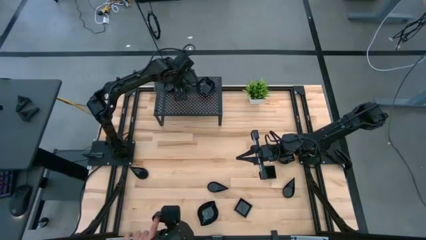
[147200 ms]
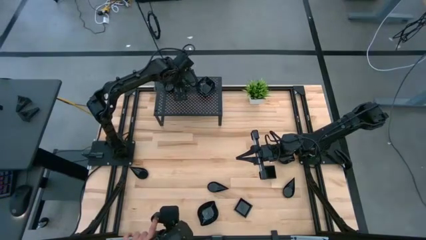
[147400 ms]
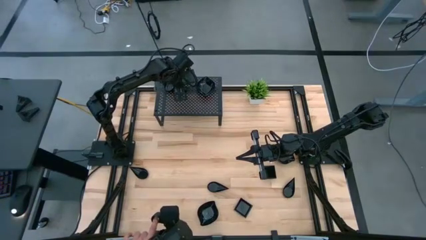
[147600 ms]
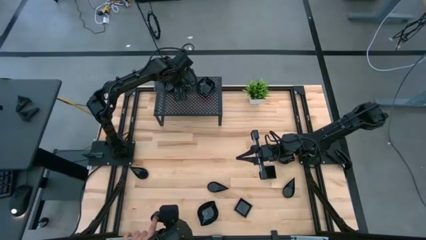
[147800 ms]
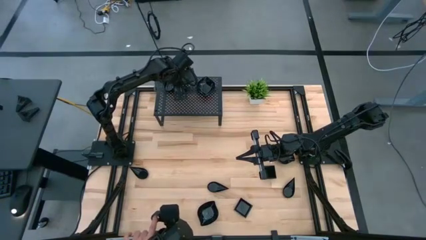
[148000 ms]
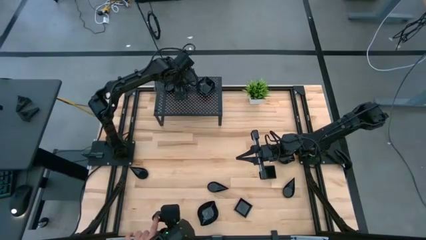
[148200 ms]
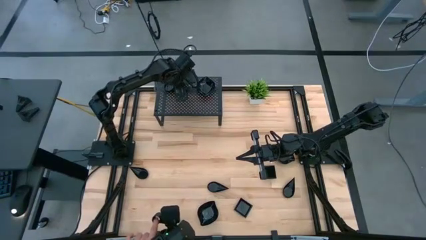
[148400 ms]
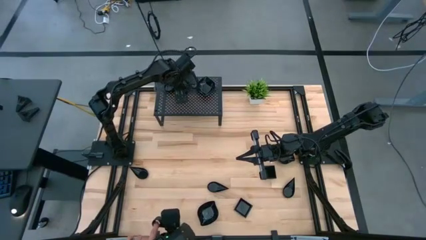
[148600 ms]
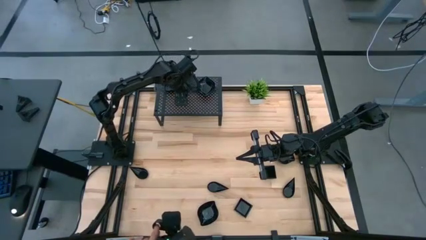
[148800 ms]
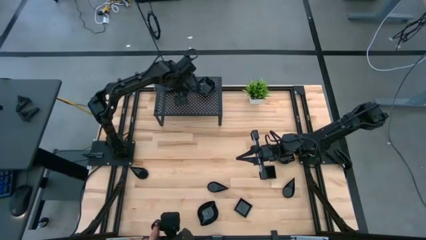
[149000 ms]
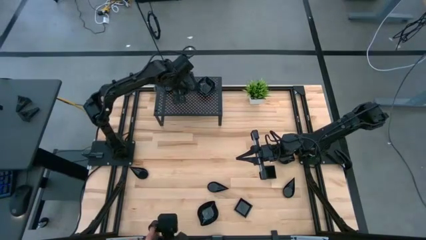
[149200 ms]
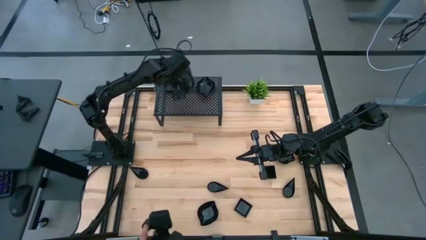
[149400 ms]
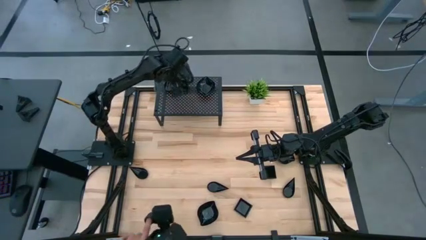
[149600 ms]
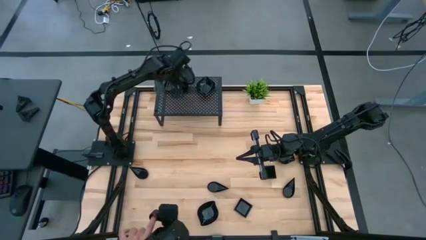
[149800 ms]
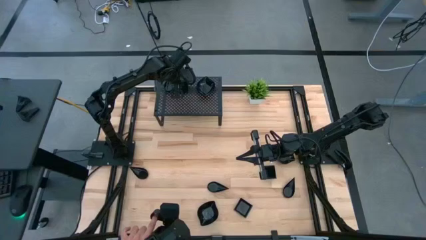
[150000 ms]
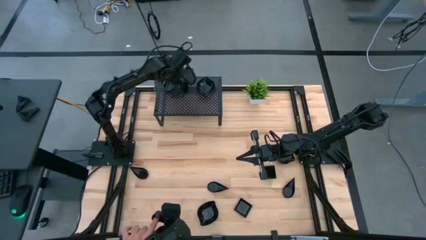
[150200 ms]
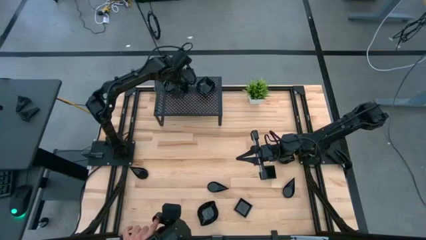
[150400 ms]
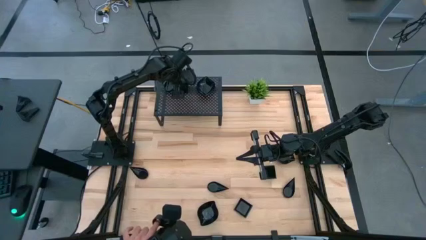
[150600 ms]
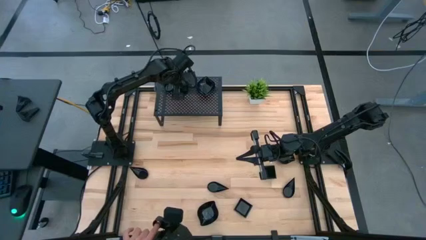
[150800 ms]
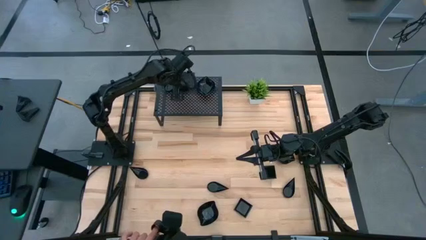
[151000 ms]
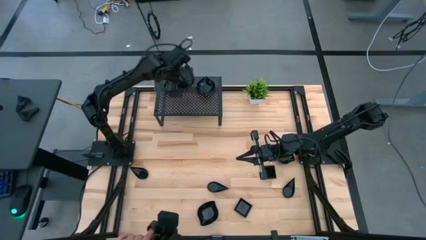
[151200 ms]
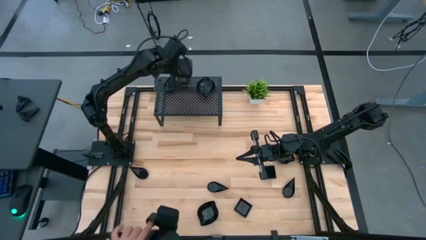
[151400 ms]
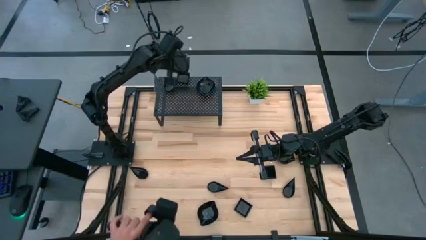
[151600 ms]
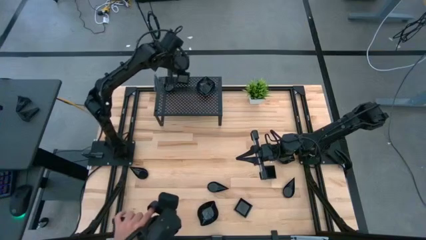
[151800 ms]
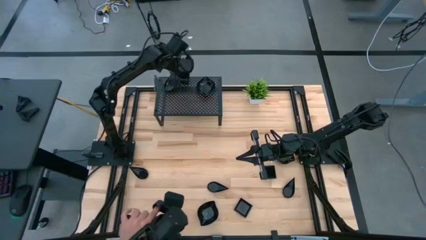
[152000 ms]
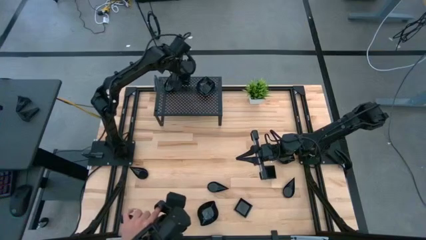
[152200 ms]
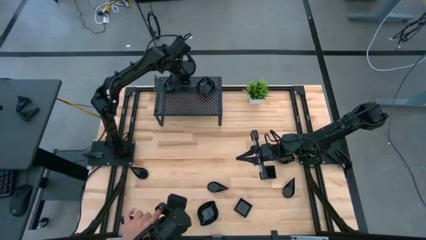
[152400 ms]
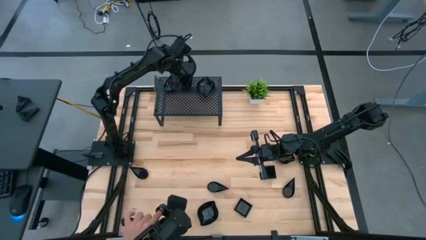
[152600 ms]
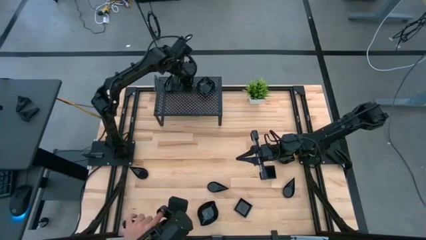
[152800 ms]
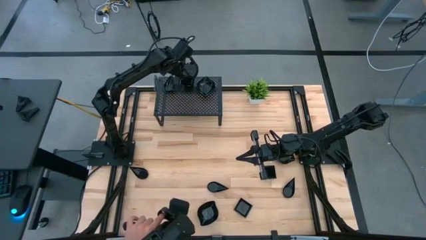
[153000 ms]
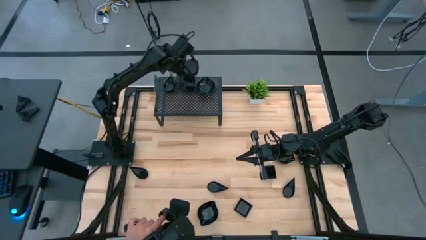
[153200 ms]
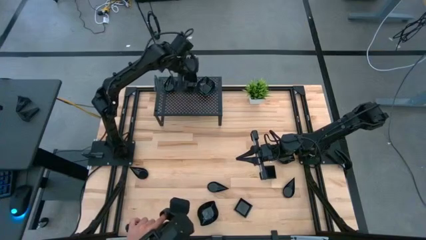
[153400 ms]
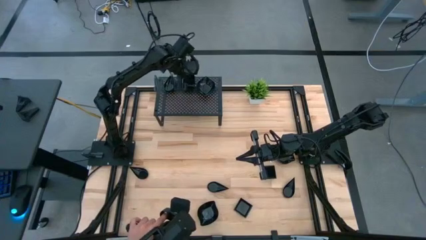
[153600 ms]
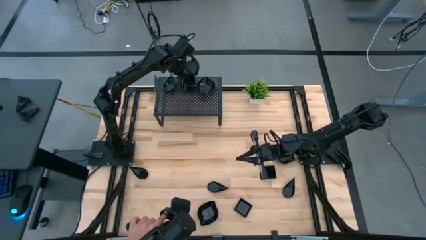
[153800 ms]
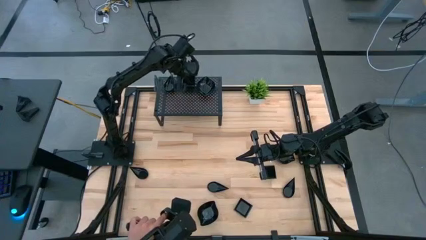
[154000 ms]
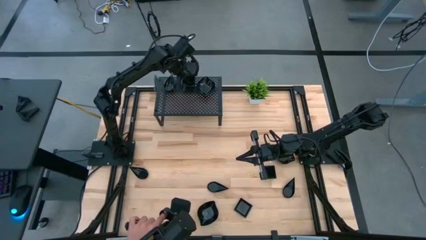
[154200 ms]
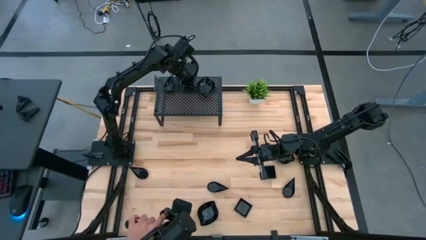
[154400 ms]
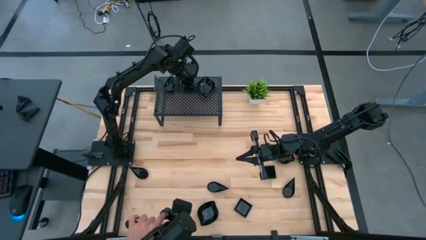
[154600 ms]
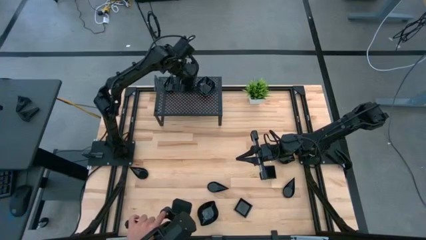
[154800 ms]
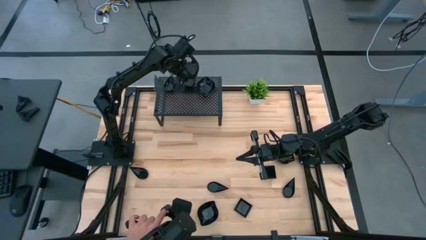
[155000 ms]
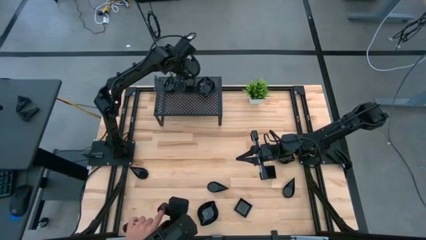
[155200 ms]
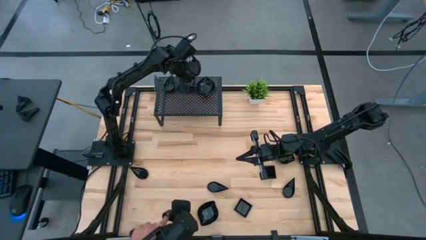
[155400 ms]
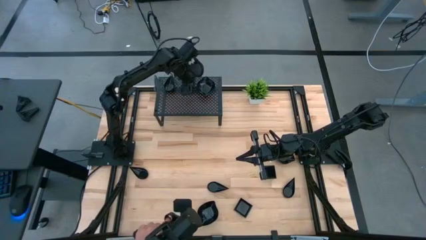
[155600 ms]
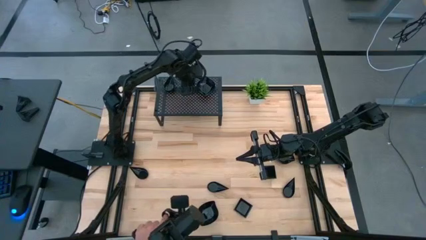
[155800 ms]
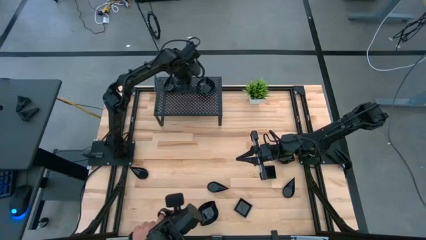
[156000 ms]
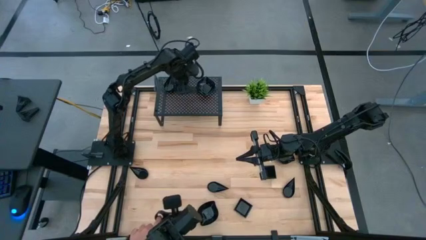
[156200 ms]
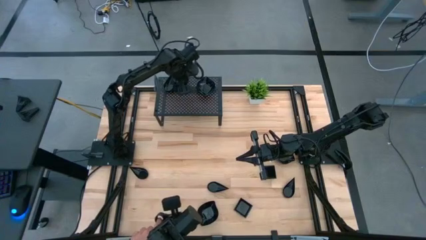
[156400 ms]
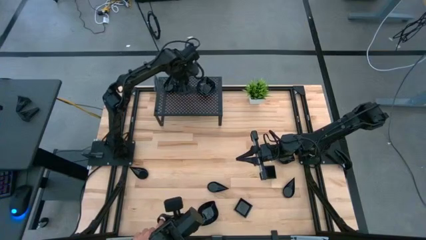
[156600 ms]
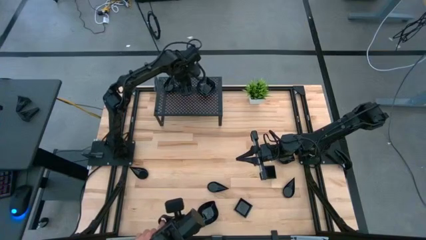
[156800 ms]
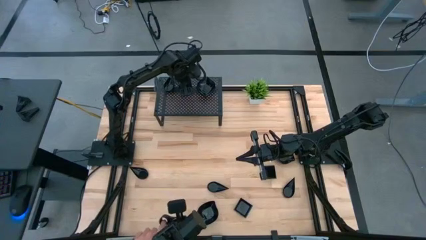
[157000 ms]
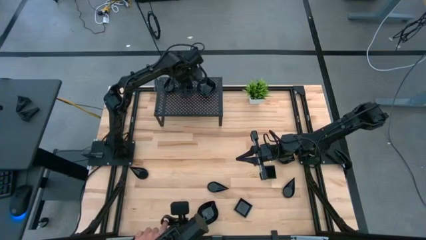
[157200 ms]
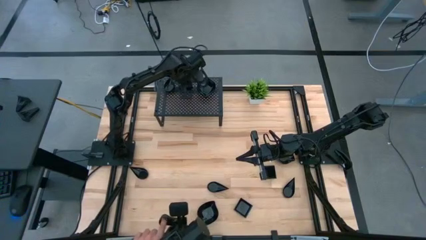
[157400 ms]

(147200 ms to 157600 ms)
Task: Pick & Place Mini shaped plates
Stack the black square plate on top of the square plate on the shelf

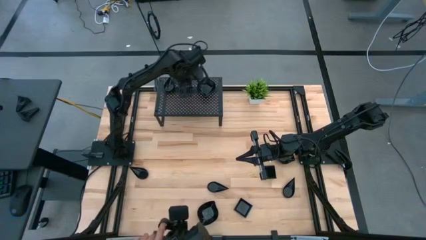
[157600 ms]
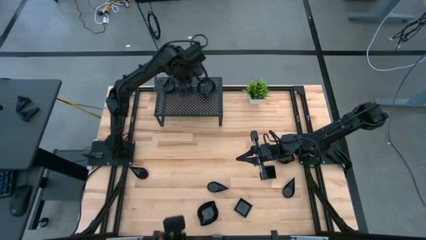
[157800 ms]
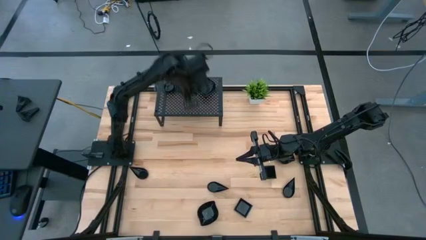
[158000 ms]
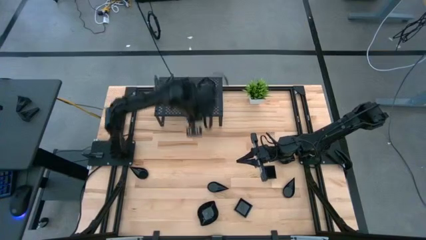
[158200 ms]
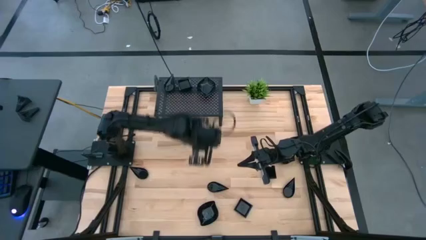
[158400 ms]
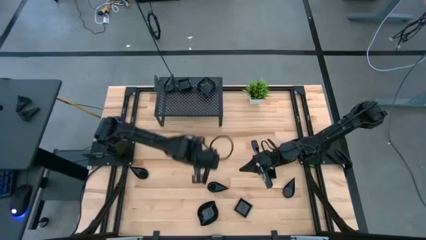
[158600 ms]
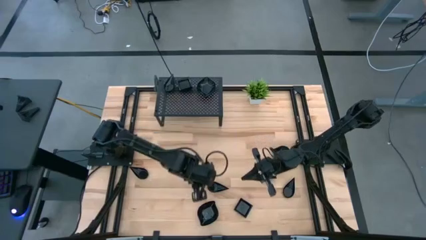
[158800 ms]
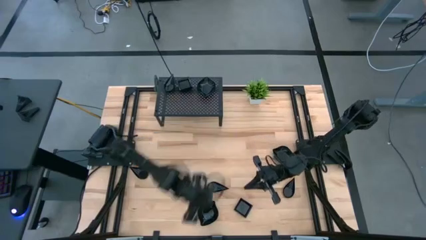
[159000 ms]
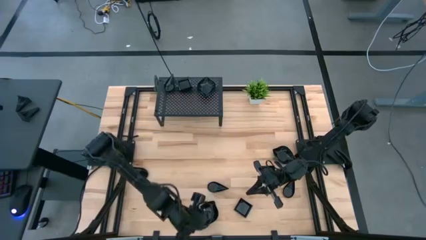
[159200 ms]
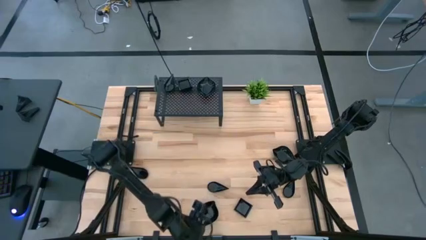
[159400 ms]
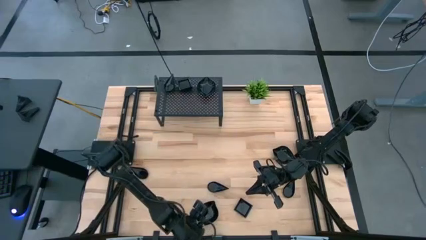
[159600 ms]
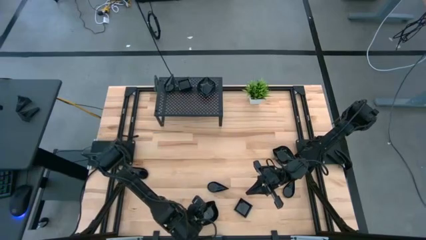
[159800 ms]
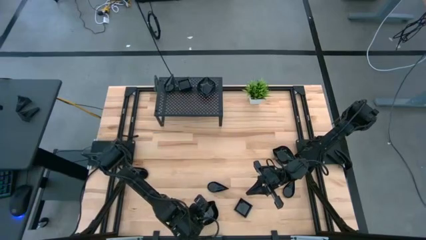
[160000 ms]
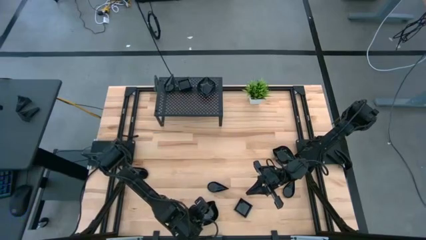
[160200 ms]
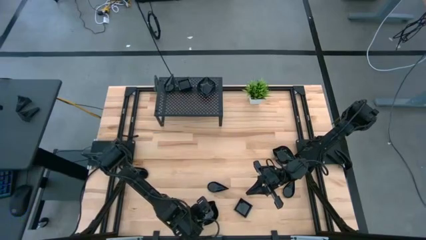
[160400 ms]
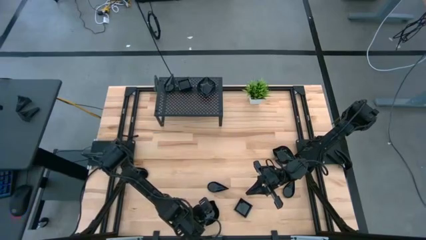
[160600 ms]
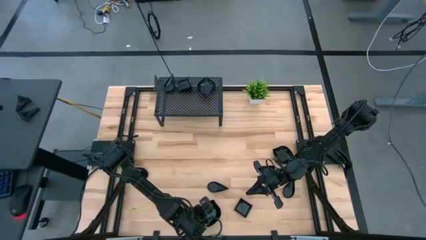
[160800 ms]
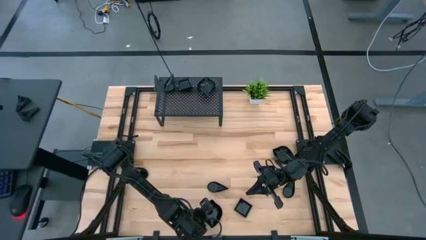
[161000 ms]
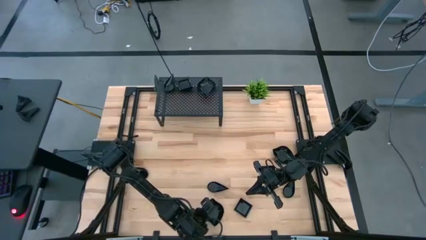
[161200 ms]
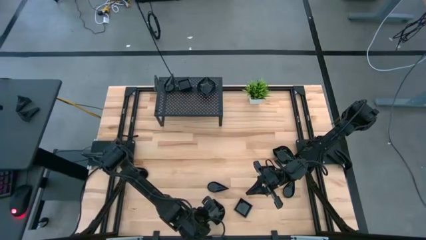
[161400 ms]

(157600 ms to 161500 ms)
Stack the black leaf-shaped plate on top of the leaf-shaped plate on the shelf

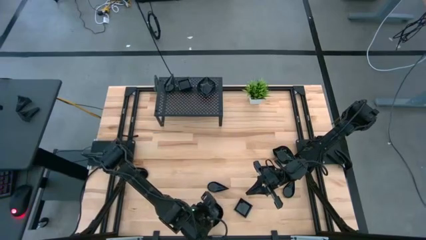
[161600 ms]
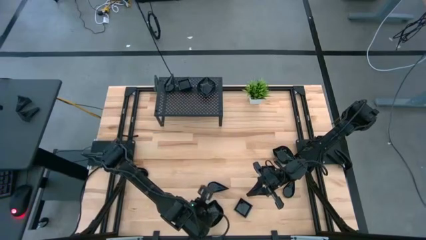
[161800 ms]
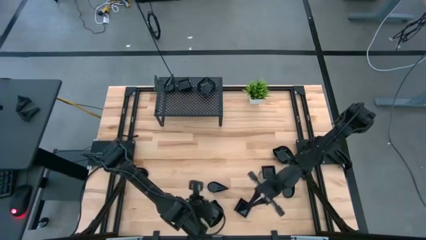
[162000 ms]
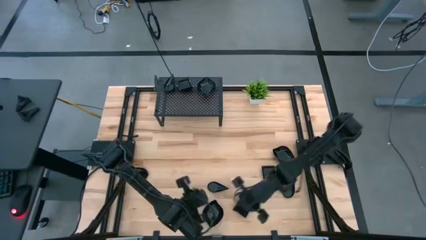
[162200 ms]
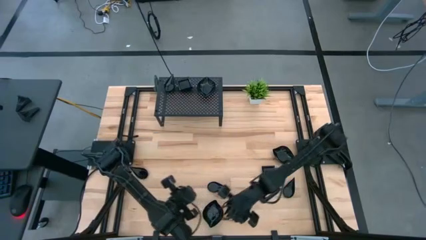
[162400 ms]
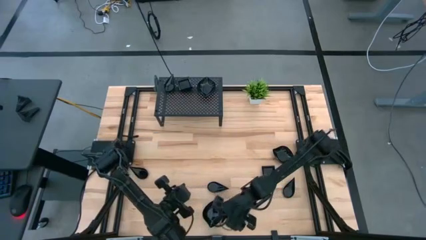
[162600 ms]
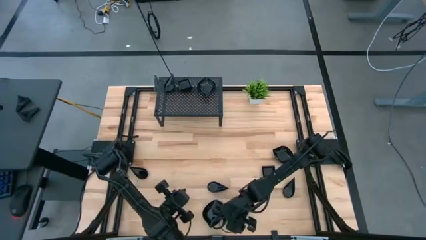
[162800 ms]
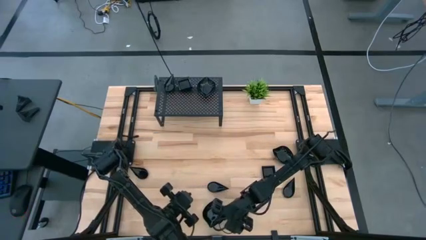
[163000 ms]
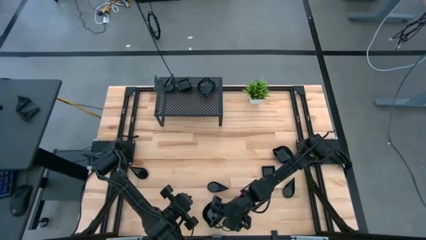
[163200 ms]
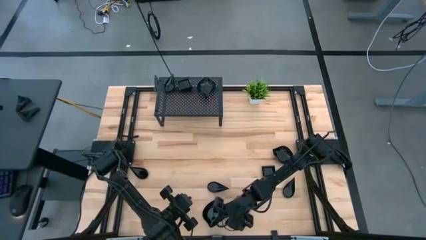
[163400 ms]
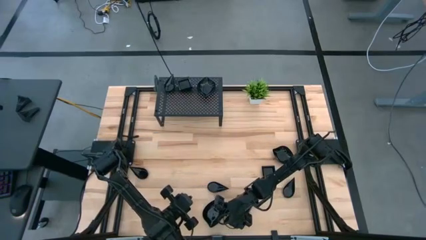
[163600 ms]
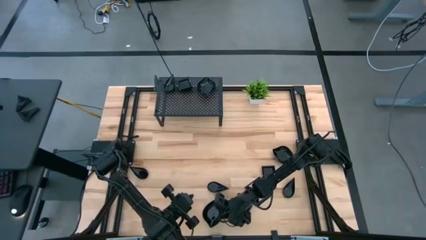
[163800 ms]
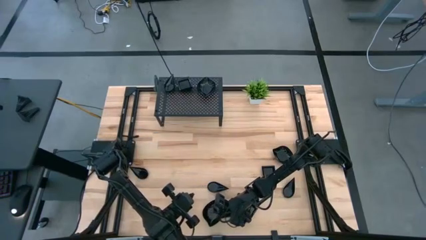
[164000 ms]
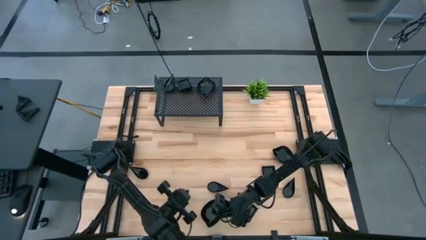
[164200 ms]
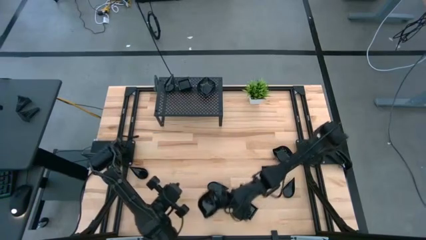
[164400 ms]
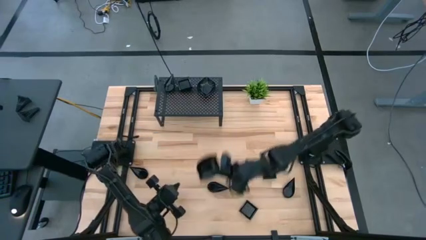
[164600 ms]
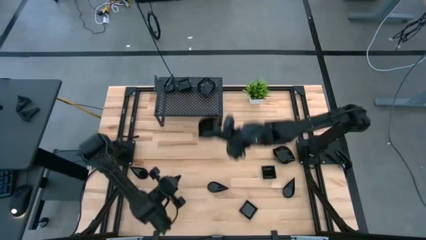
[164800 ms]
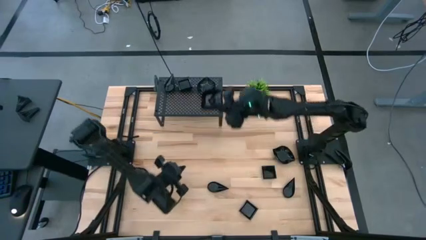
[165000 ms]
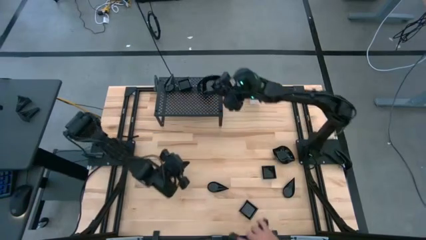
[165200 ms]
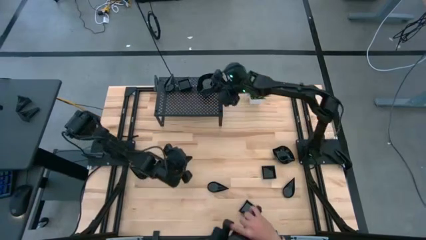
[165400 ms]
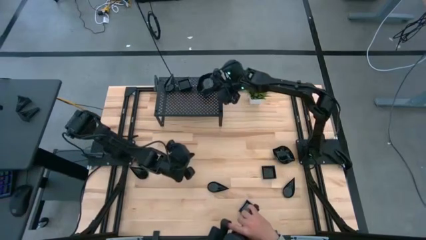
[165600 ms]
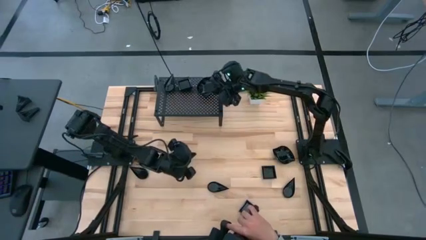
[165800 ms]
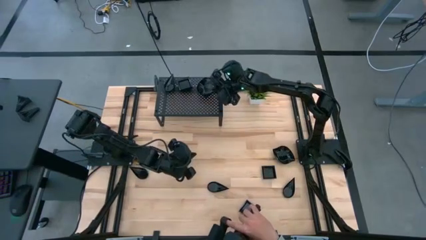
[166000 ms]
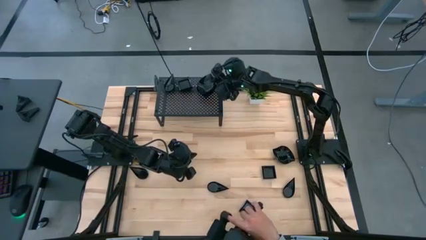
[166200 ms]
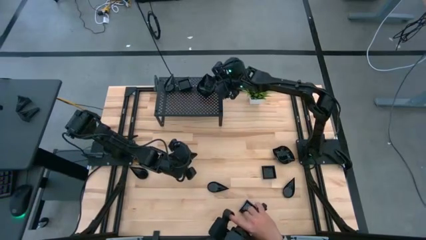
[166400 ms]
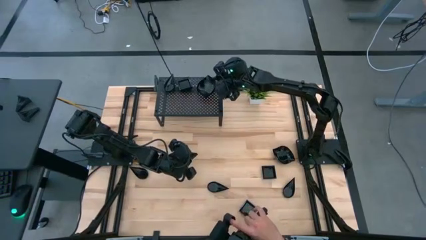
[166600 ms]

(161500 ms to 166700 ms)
Stack the black leaf-shaped plate on top of the leaf-shaped plate on the shelf
